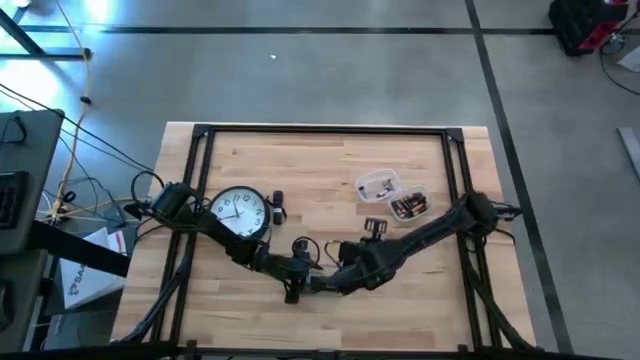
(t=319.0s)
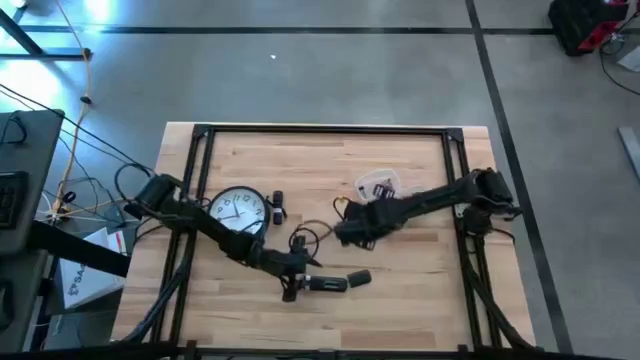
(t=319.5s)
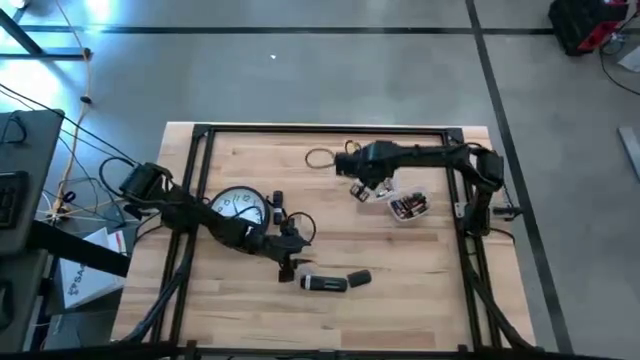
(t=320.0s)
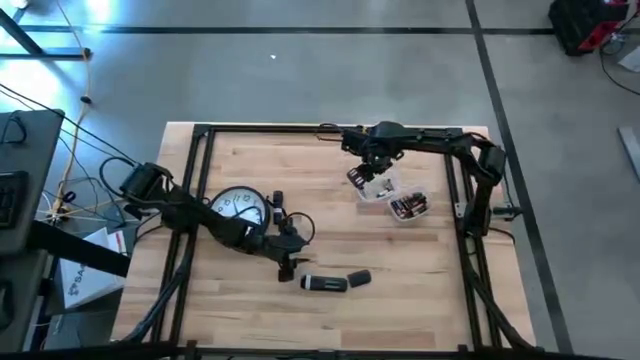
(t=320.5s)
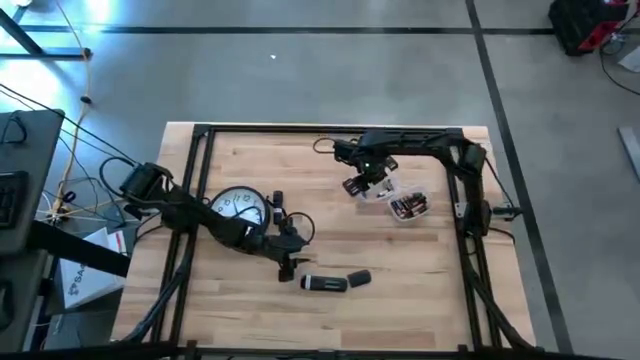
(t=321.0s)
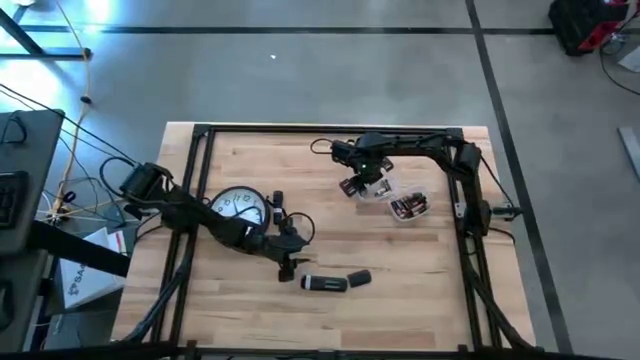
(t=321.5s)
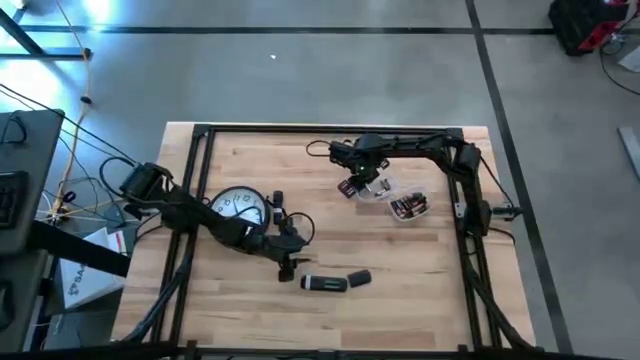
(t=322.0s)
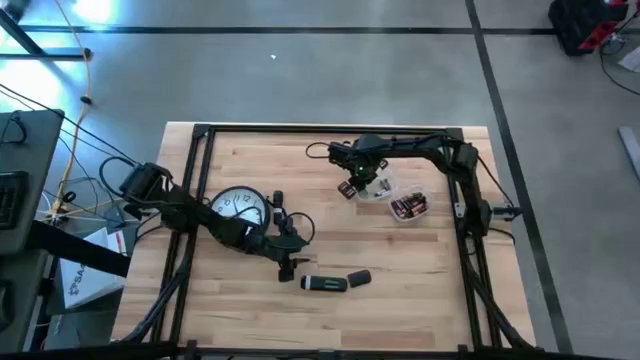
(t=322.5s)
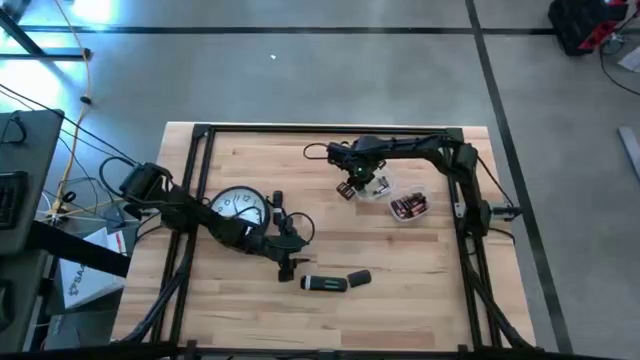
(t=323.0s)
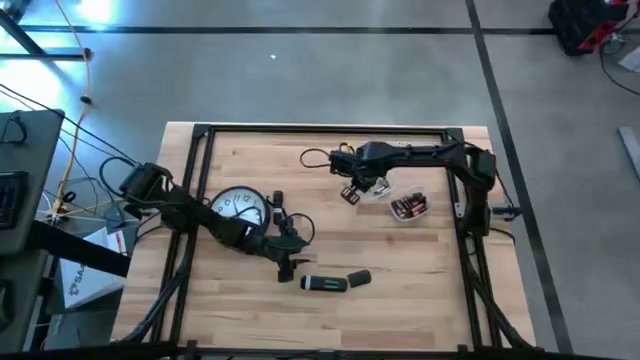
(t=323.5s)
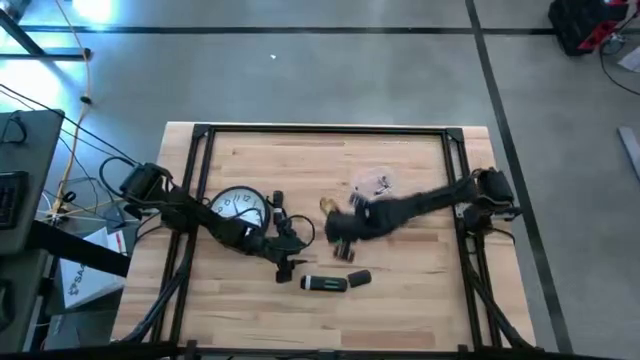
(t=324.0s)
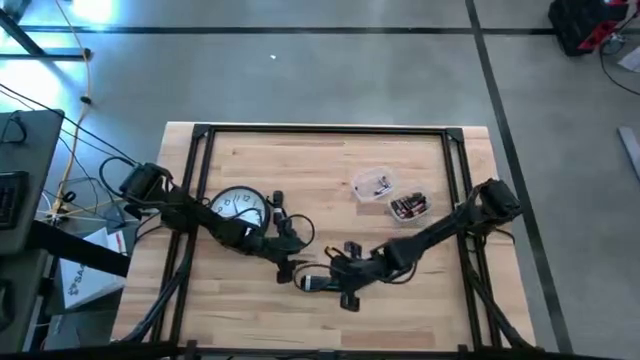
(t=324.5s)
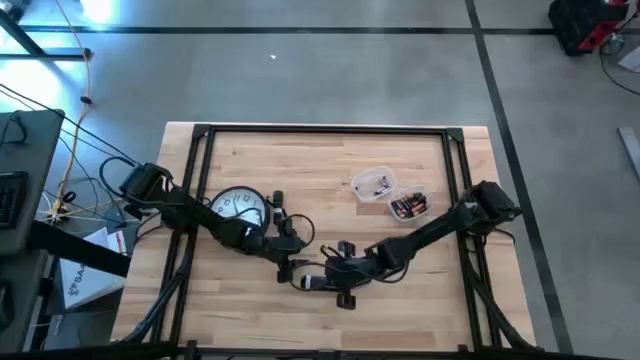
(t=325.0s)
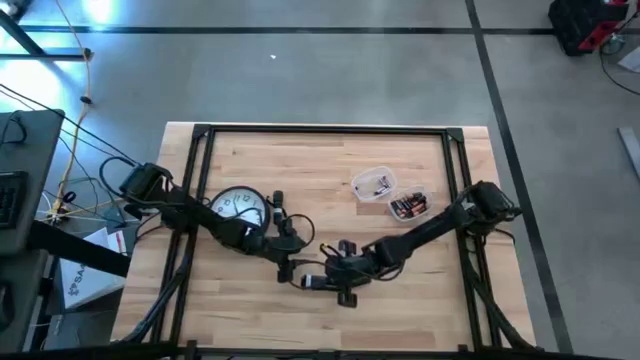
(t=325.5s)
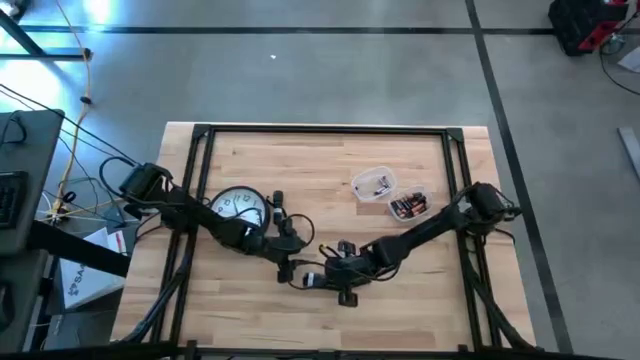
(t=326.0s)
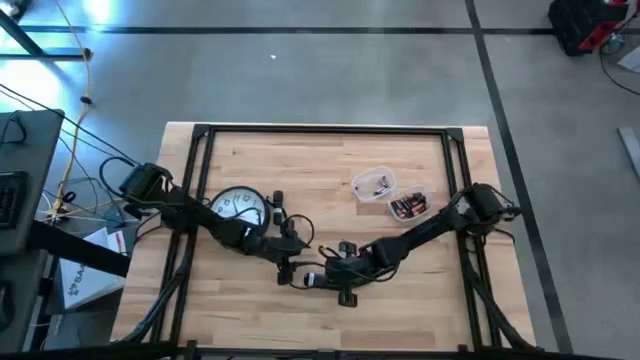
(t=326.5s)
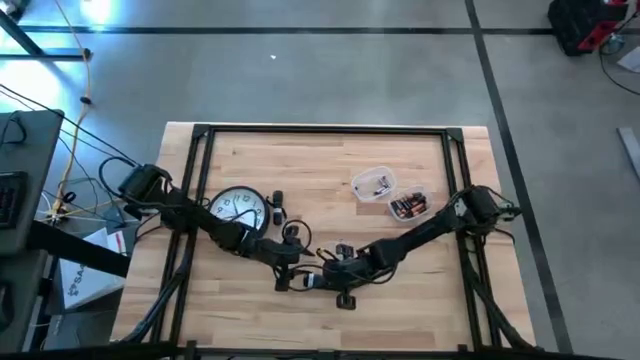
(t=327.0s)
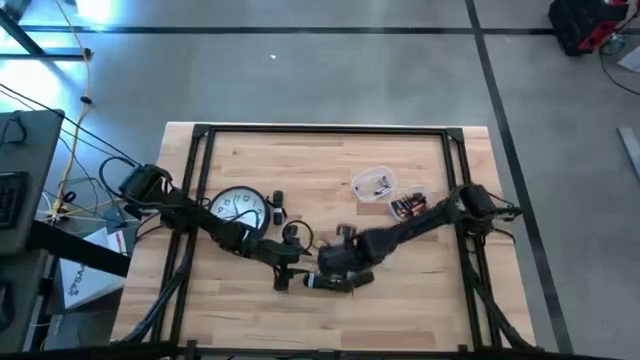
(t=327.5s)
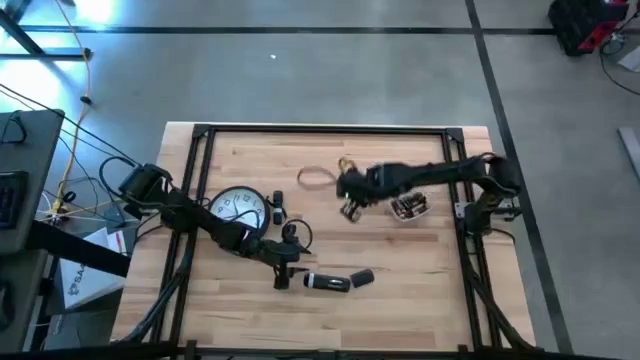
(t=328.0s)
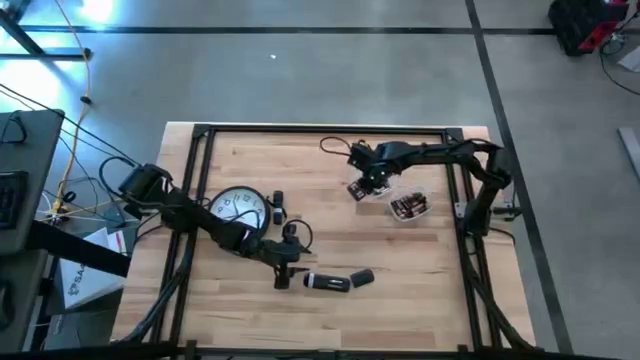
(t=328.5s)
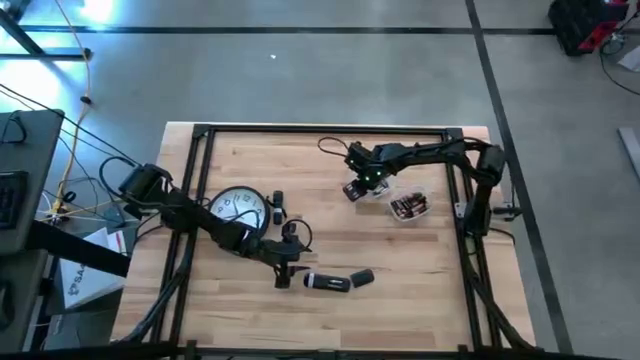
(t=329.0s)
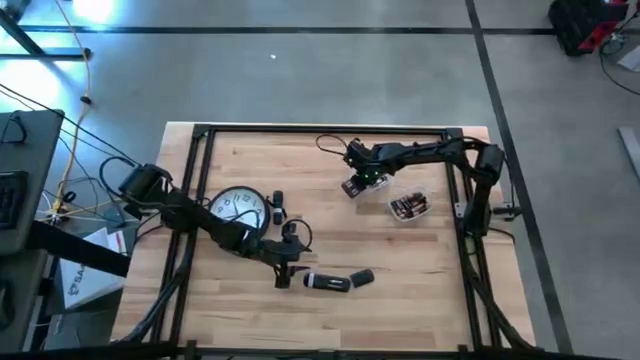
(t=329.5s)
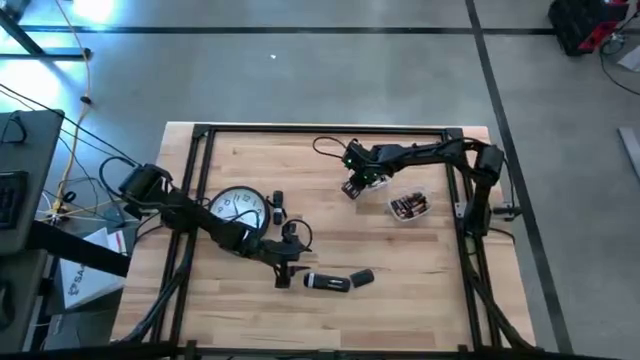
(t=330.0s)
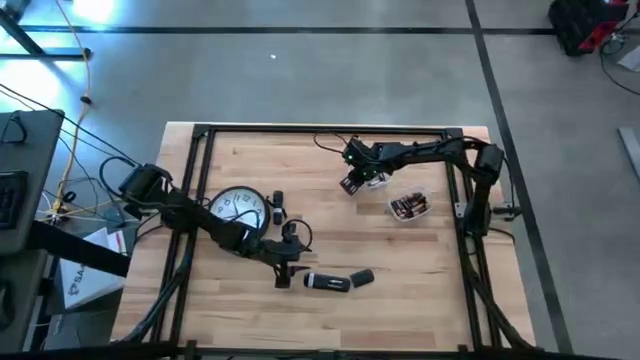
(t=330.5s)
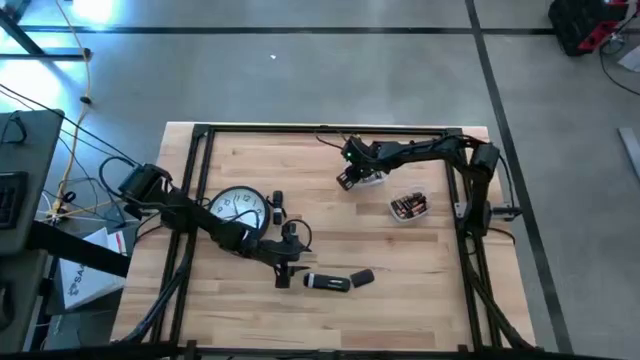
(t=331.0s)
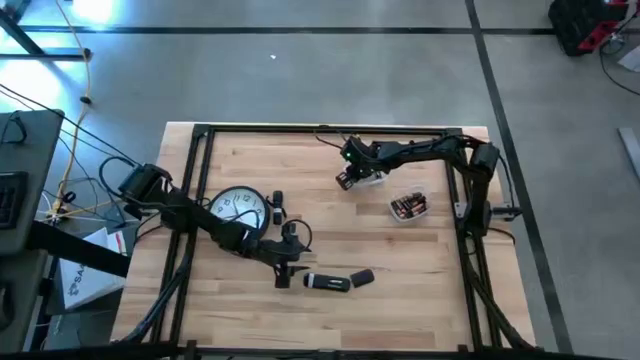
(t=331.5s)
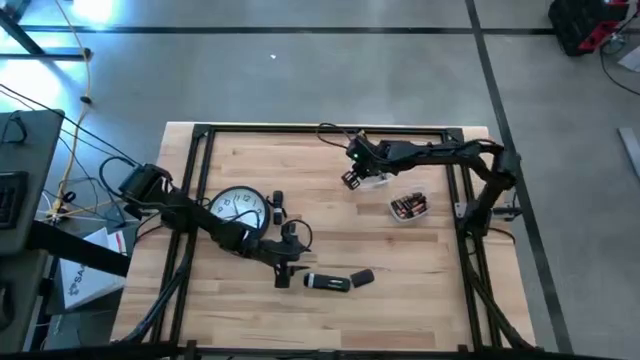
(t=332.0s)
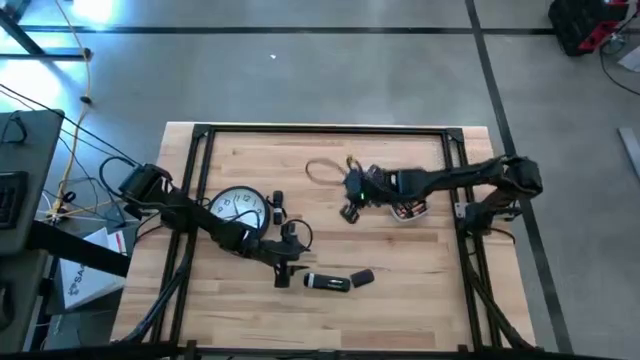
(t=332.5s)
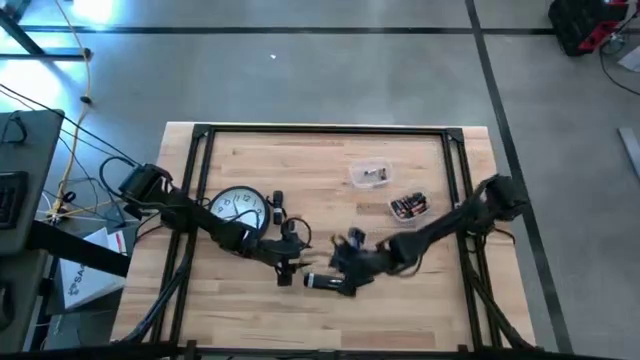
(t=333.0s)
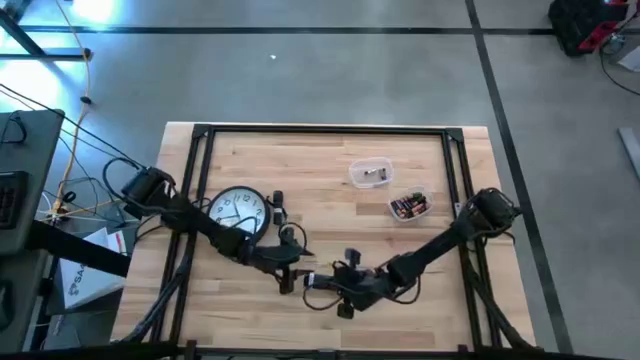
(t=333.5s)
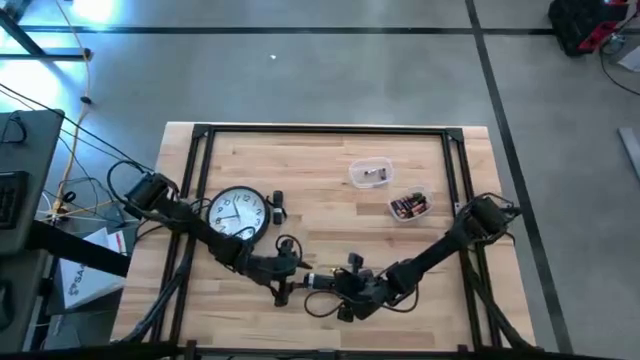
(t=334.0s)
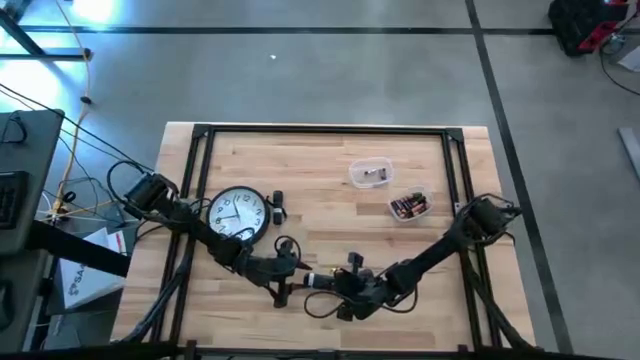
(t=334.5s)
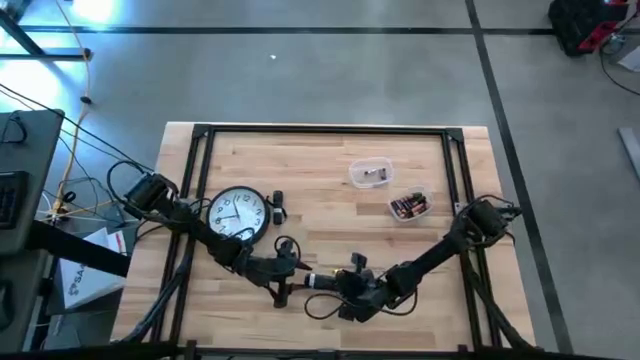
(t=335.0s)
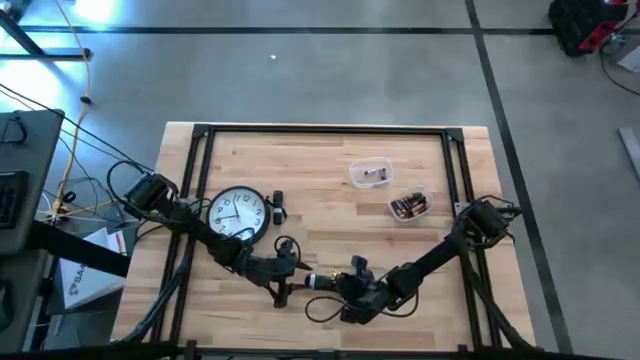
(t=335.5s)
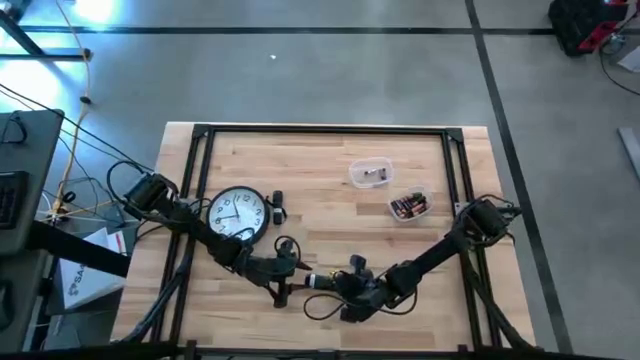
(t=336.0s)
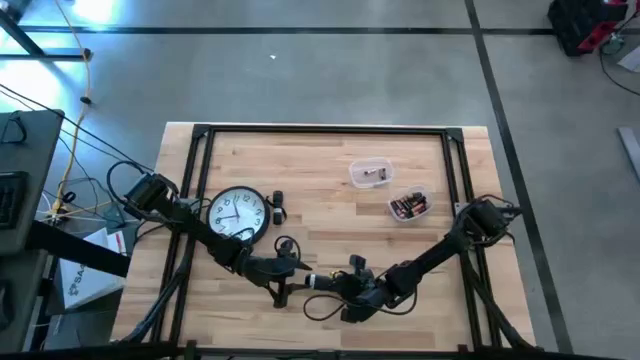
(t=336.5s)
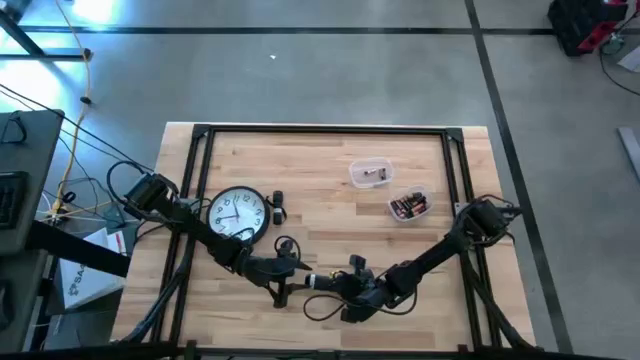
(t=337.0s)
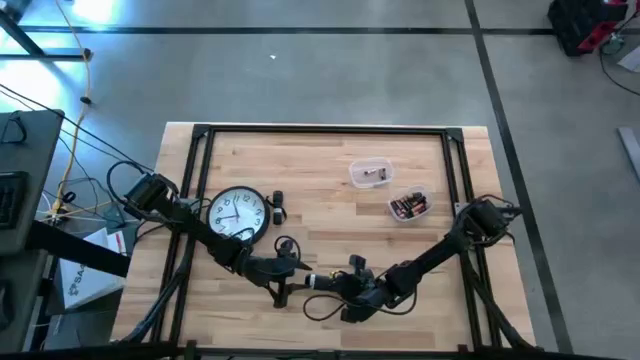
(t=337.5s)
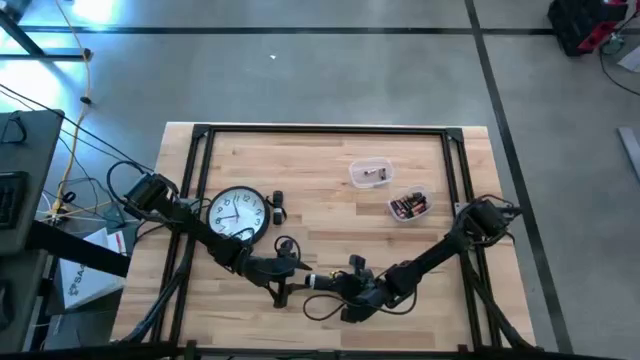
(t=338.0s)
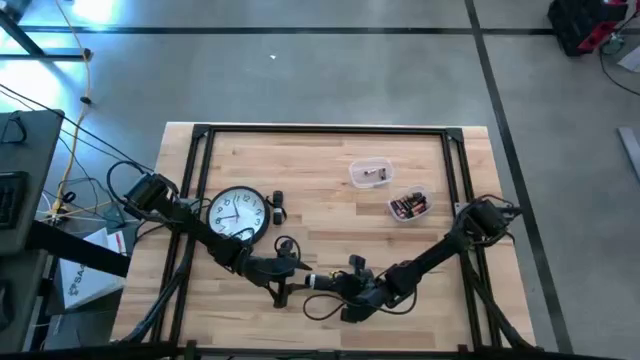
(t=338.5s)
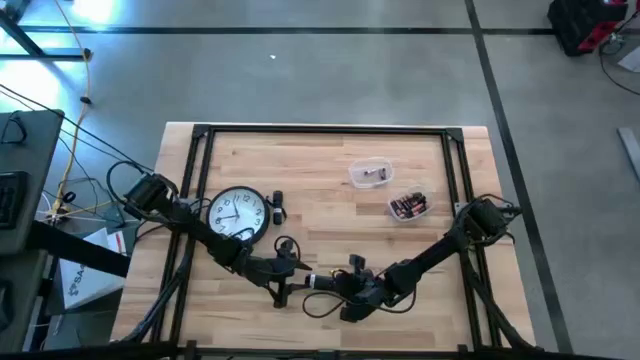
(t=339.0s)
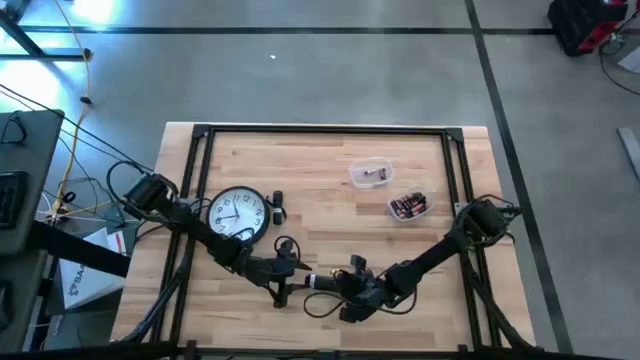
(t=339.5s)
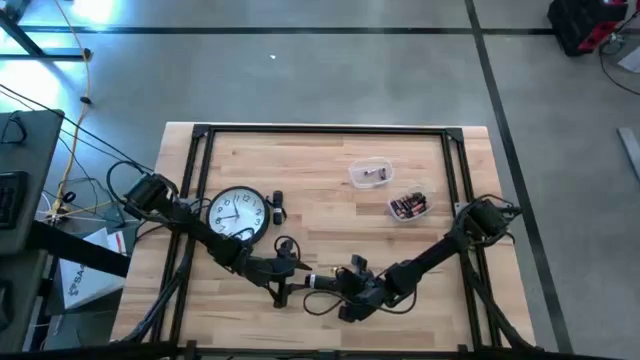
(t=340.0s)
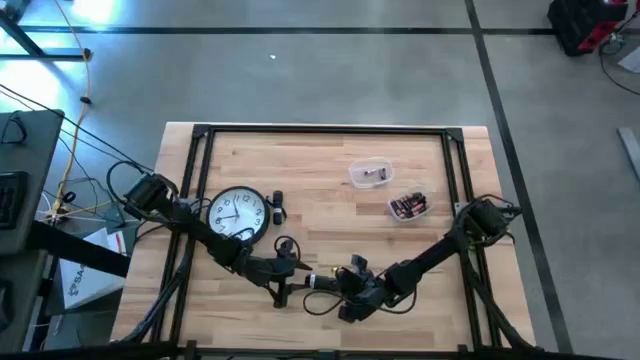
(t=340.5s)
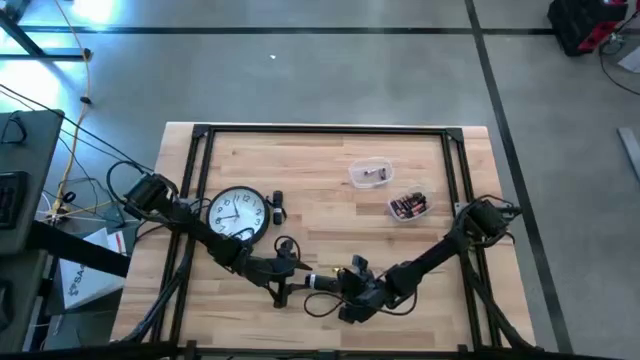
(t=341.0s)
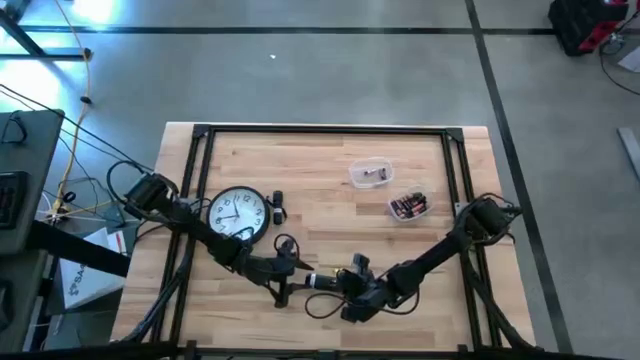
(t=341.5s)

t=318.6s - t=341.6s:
Task: Insert battery
Insert the silver battery into the black remote control battery compartment
